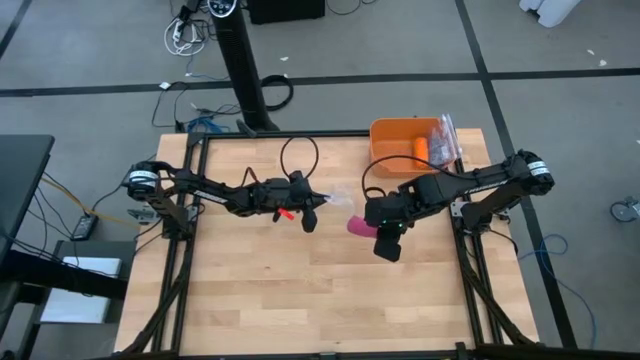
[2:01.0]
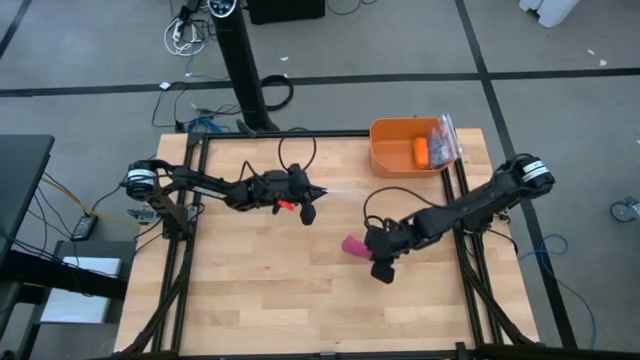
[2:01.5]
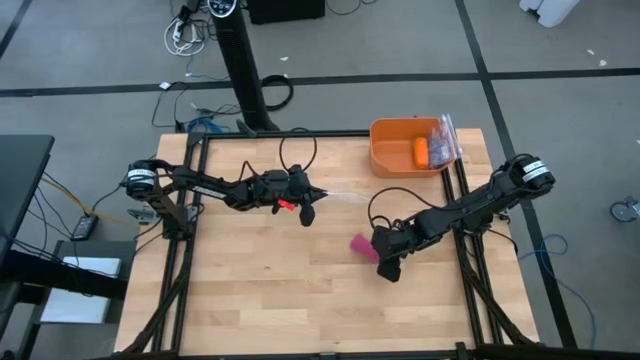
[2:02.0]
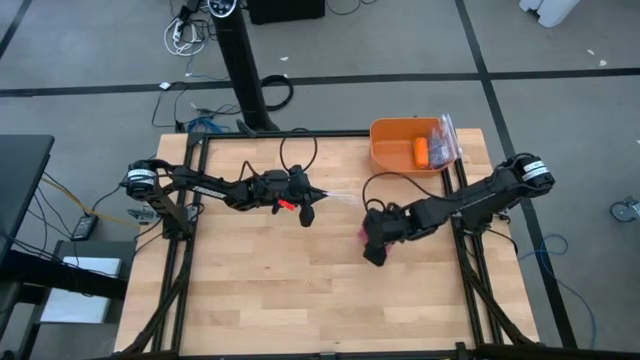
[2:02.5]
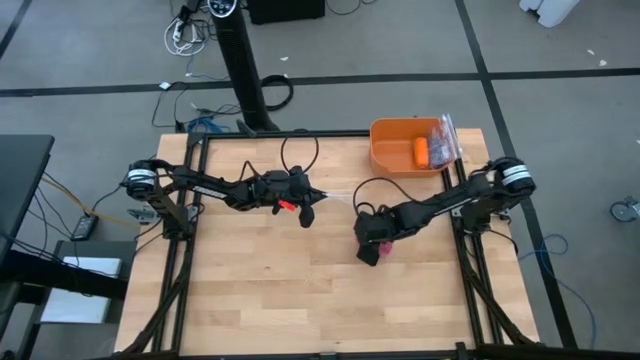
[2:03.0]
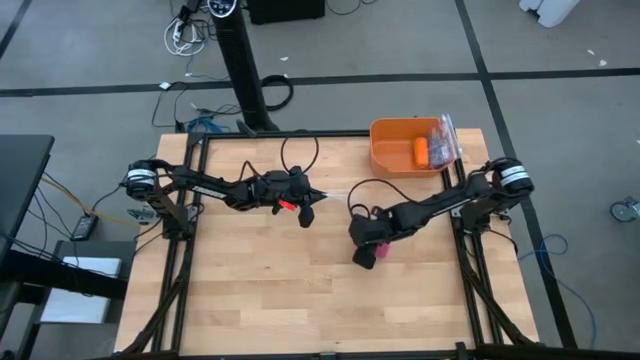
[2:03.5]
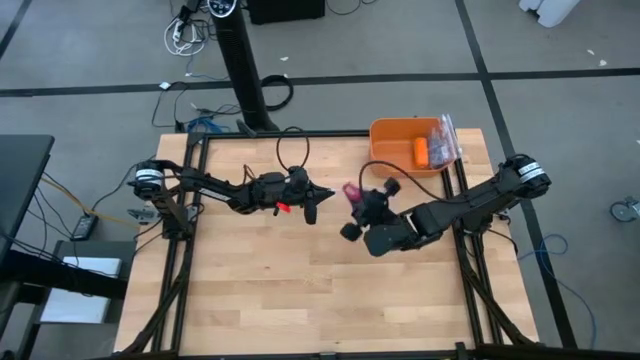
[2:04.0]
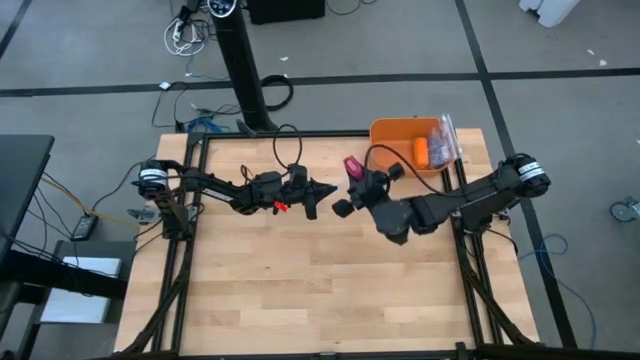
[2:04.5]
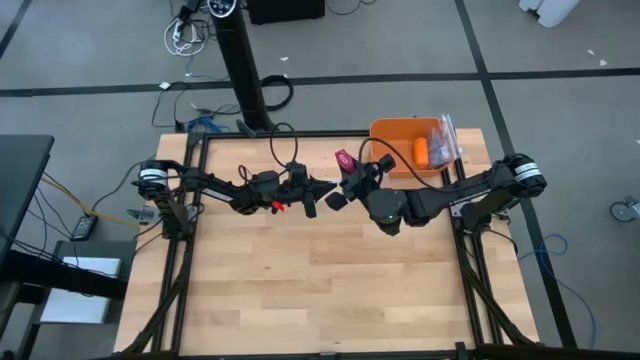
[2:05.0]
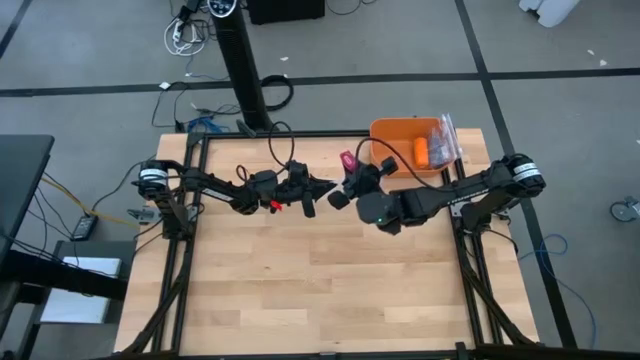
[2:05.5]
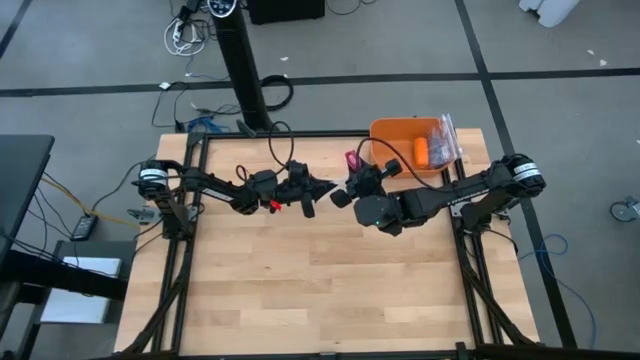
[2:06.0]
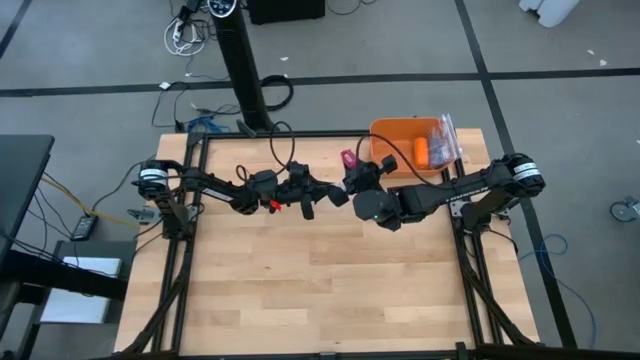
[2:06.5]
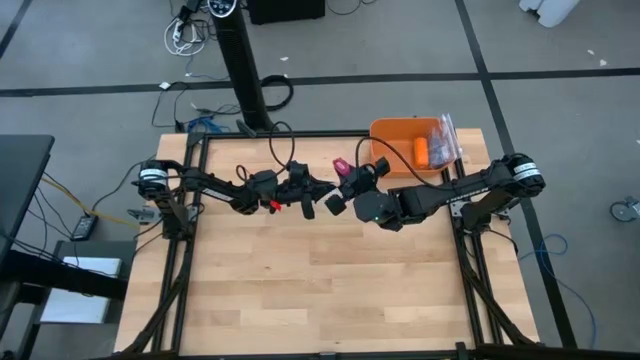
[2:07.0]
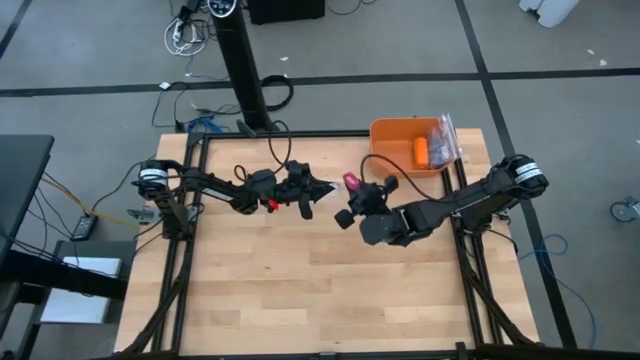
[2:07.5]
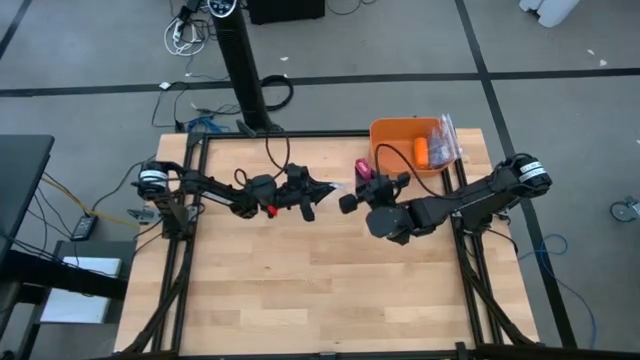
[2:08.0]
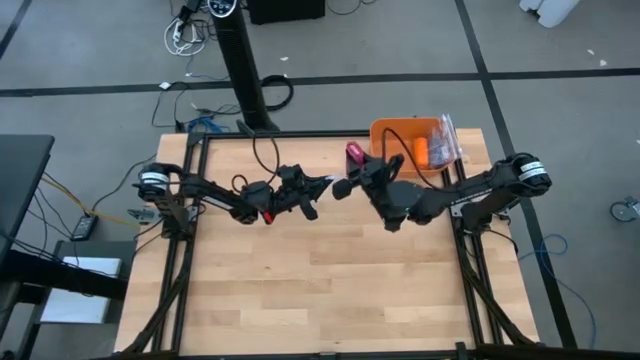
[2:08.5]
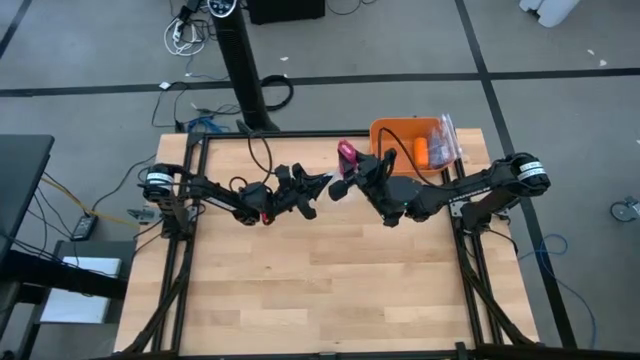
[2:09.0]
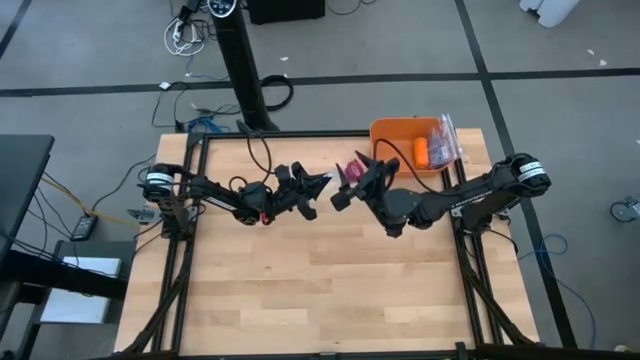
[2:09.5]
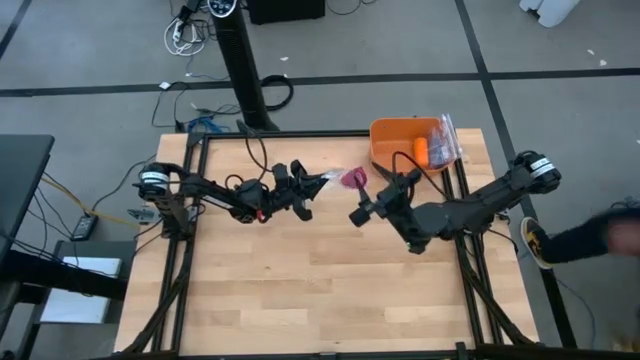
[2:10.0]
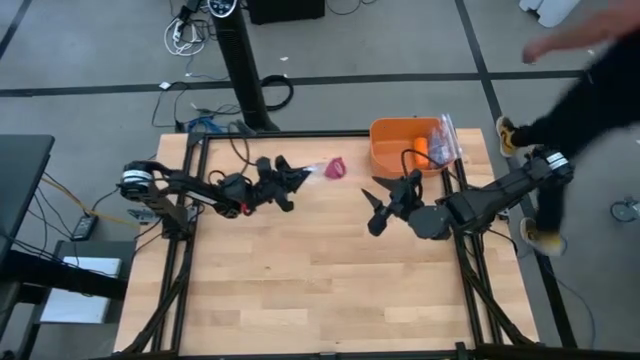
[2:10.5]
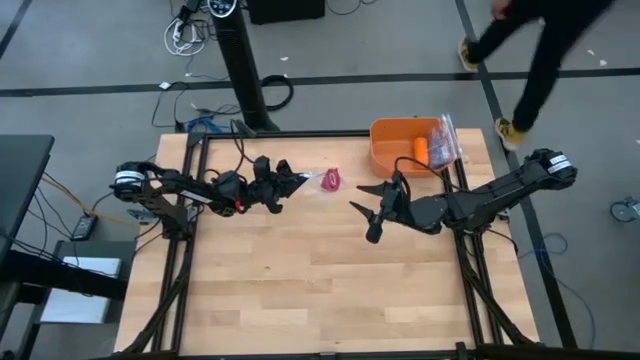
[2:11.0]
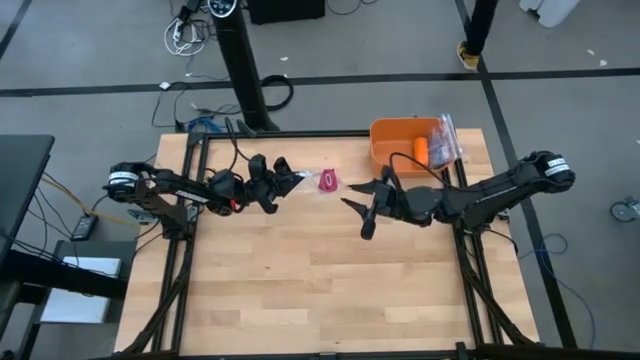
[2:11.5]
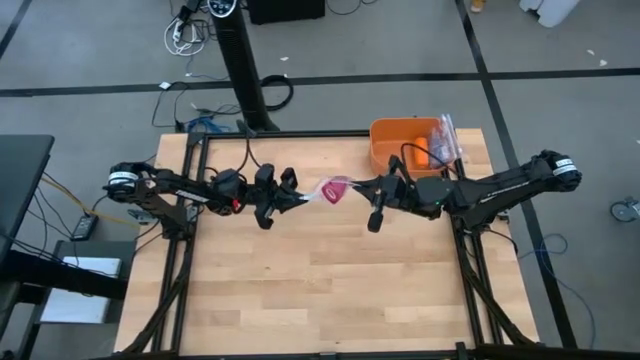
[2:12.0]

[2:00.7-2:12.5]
Task: Roll bandage
Insert the pink bandage into the transparent zip bag

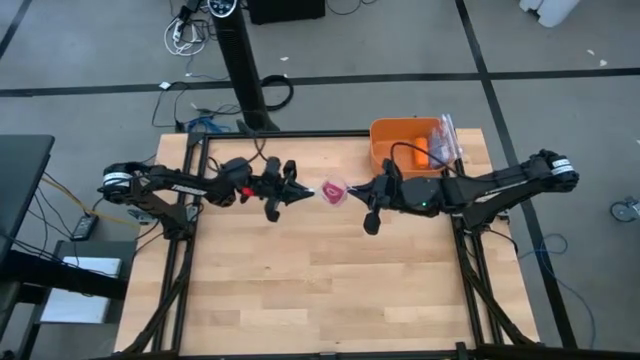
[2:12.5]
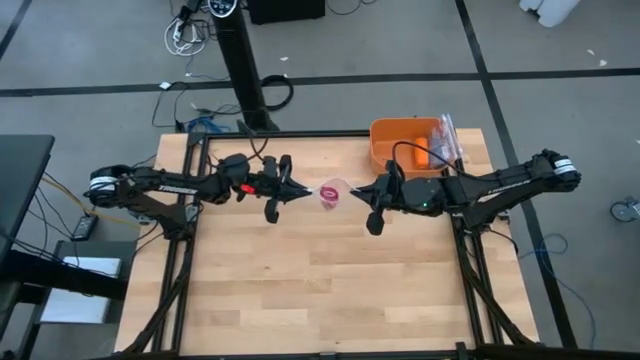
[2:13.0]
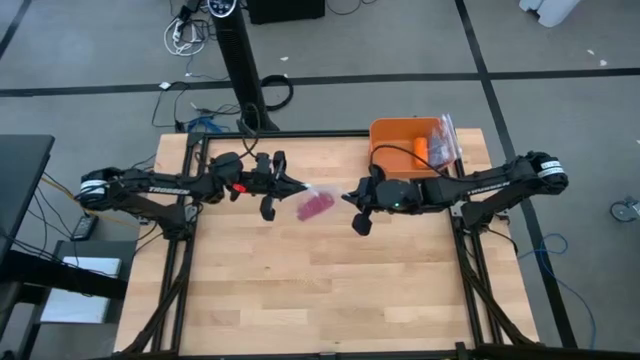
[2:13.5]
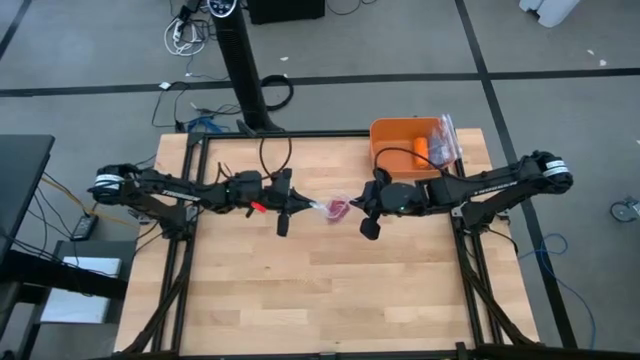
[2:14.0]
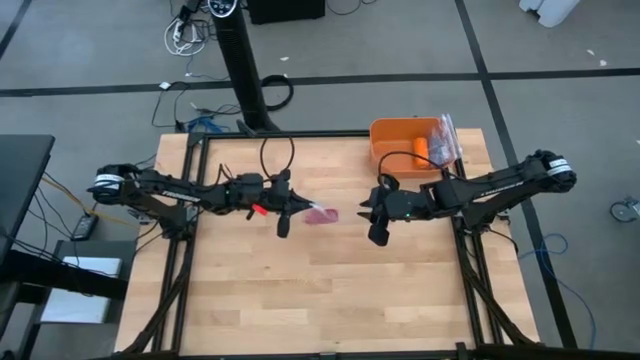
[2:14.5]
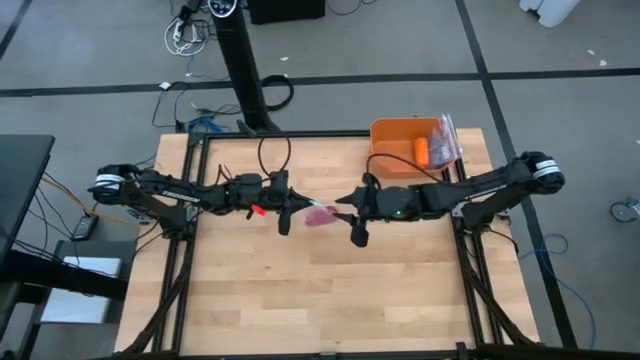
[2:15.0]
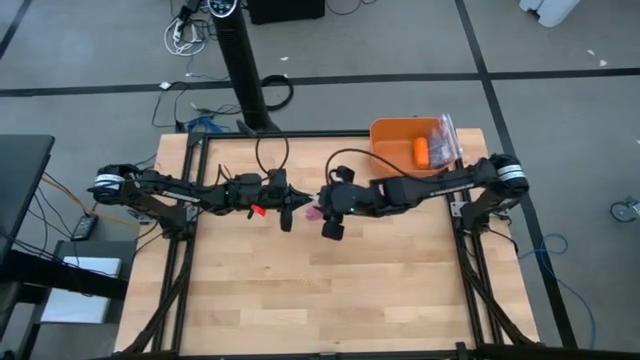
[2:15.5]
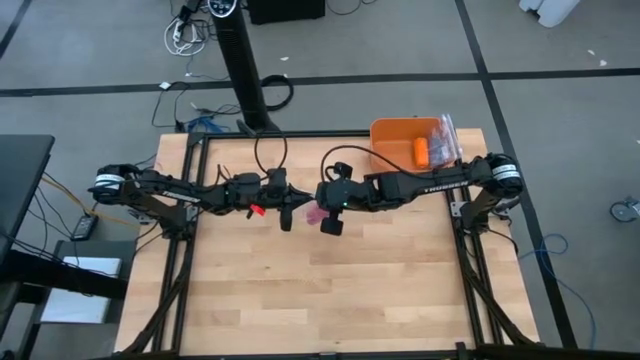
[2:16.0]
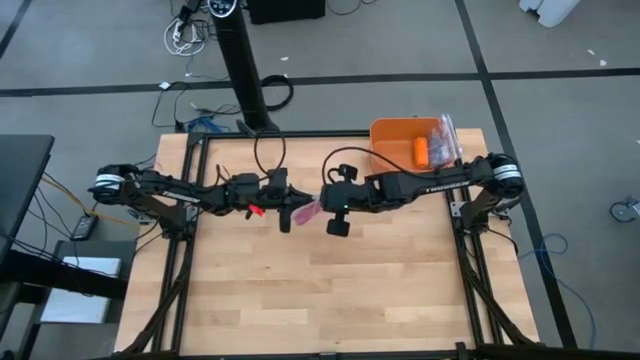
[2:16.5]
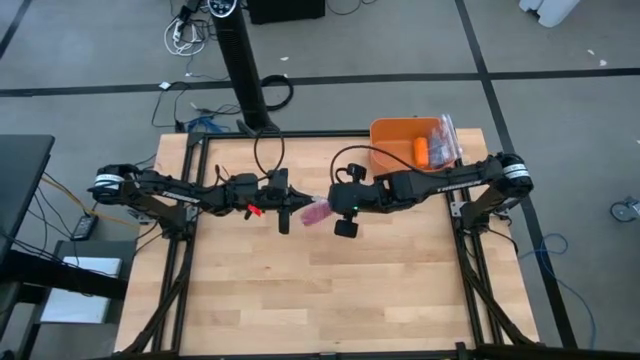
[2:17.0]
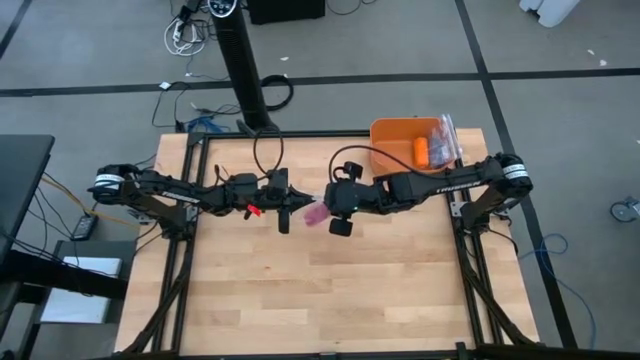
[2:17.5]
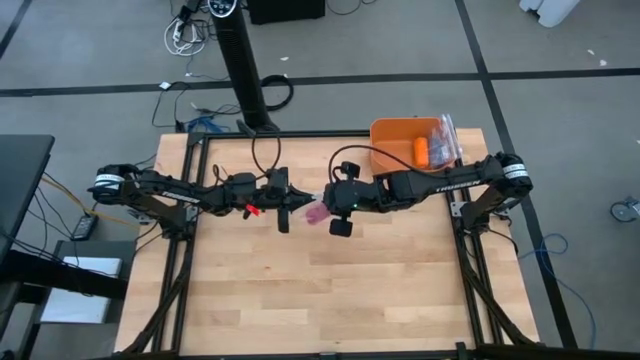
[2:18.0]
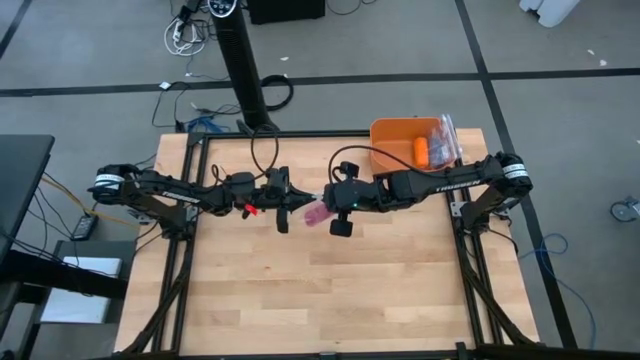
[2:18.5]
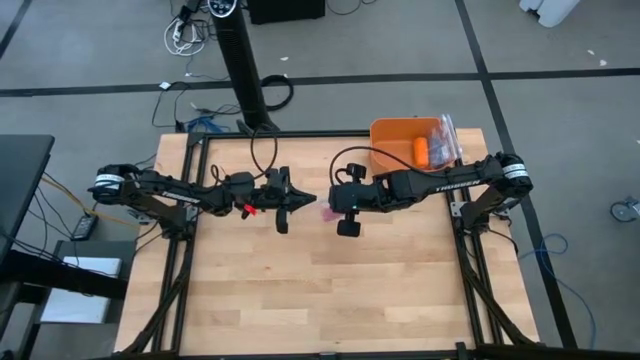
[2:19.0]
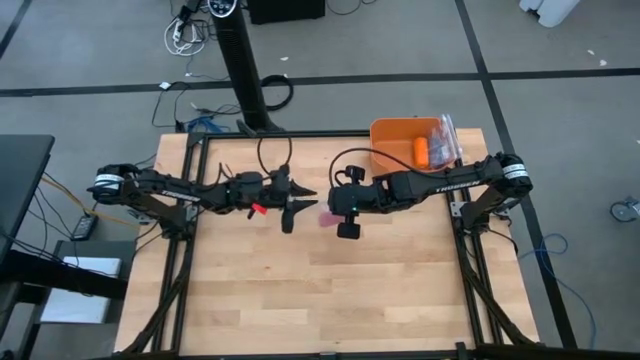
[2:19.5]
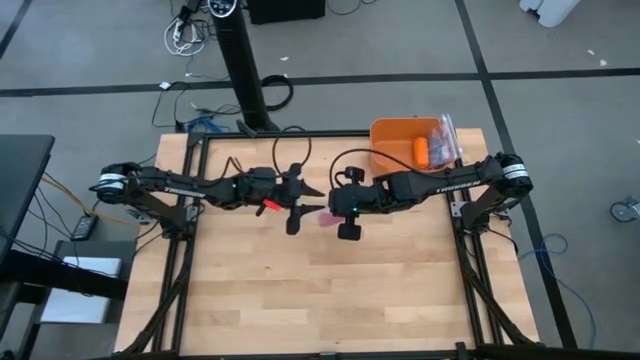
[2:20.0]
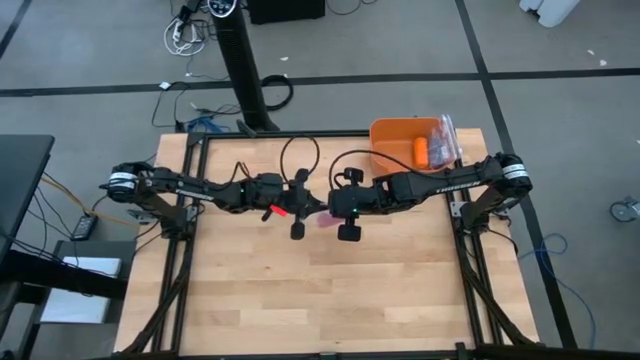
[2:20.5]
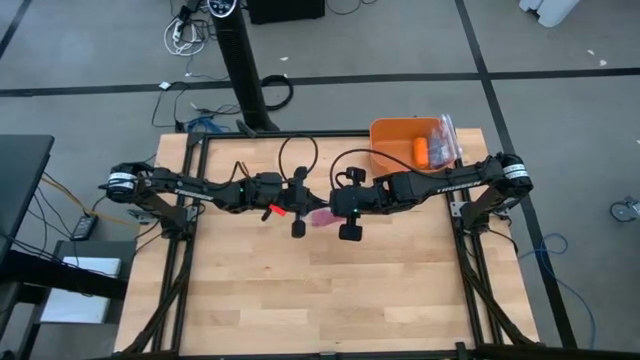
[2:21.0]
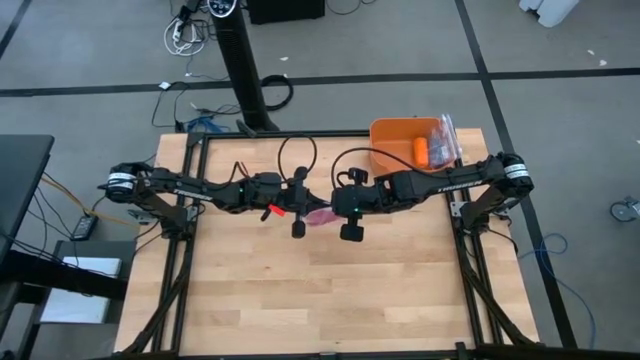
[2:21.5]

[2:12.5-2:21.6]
Close the transparent zip bag

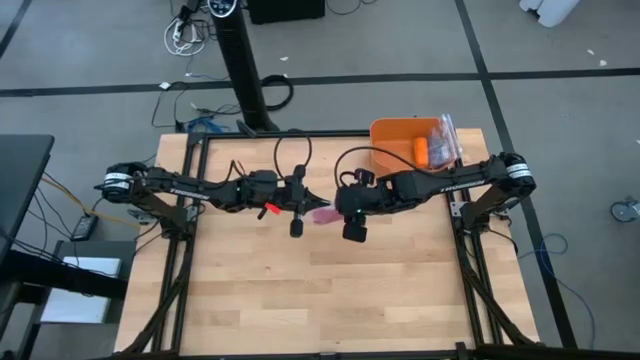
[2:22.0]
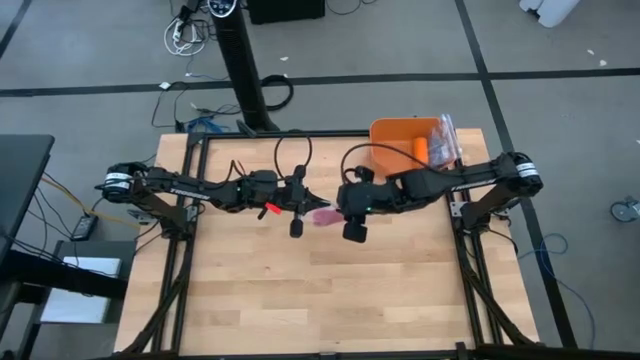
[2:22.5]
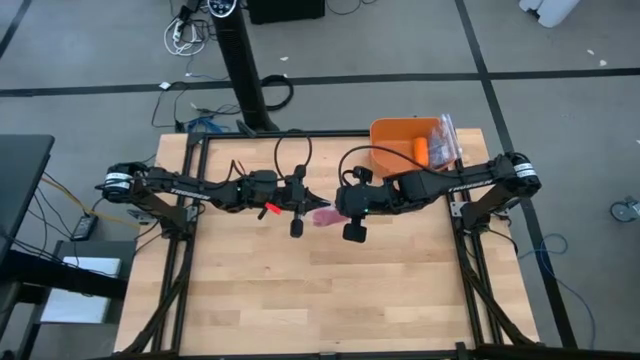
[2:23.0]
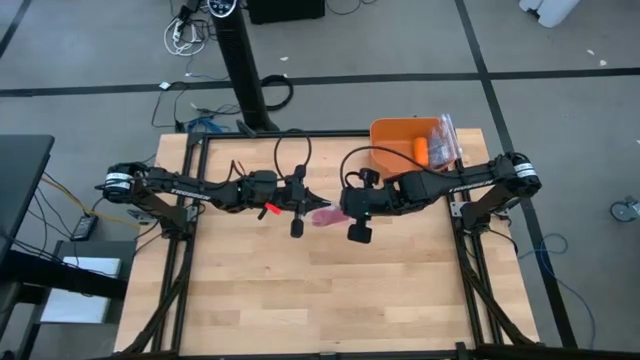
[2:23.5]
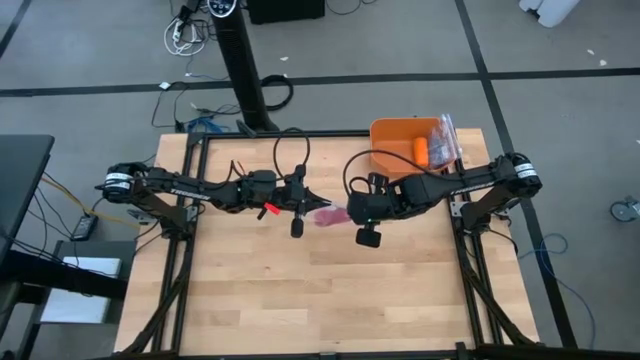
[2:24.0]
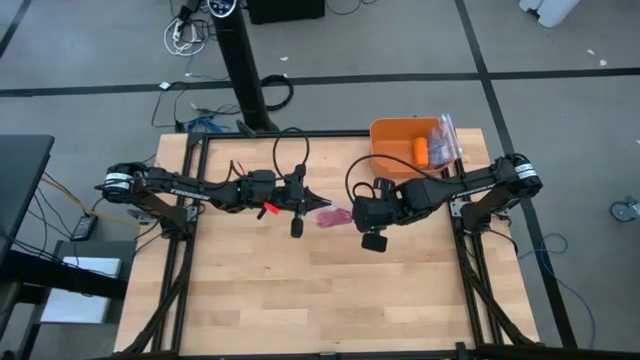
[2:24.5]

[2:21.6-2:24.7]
Close the transparent zip bag
